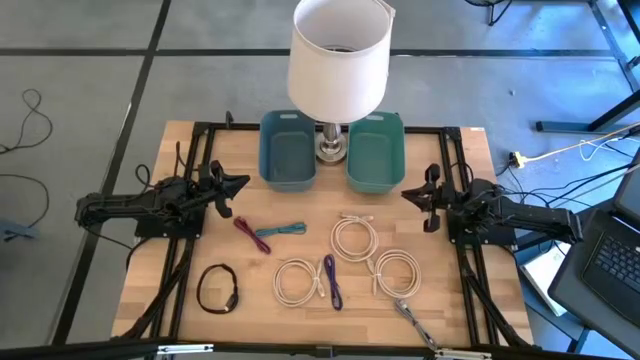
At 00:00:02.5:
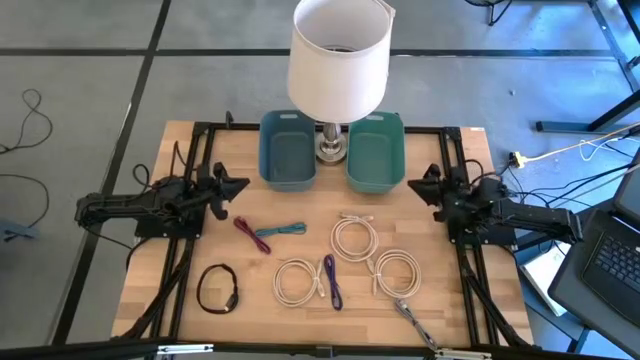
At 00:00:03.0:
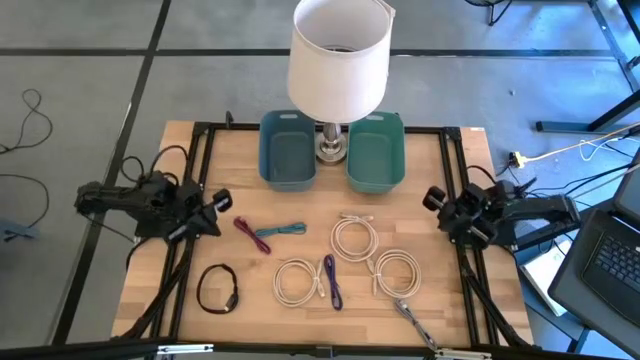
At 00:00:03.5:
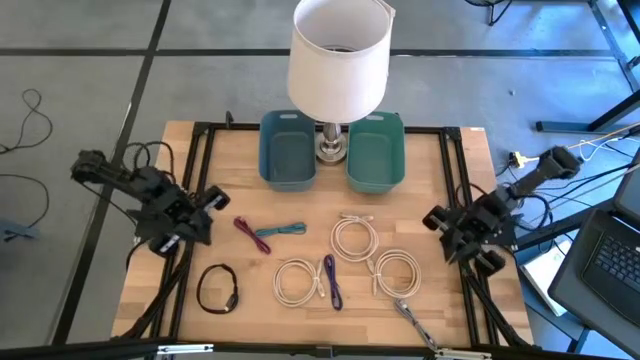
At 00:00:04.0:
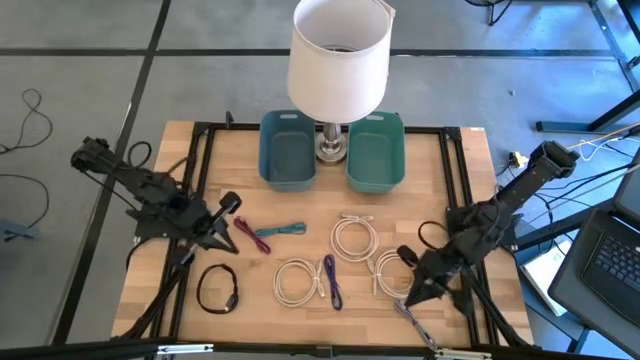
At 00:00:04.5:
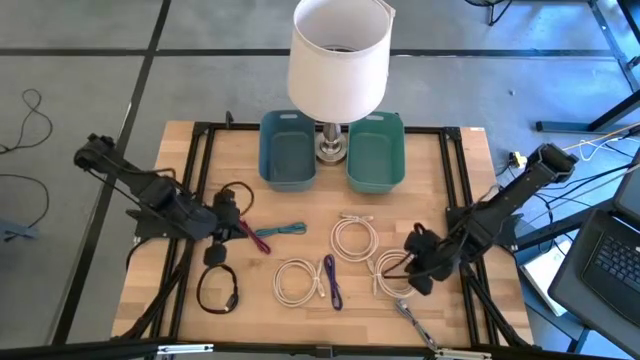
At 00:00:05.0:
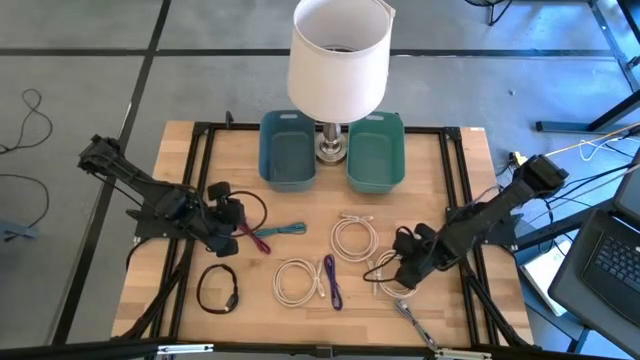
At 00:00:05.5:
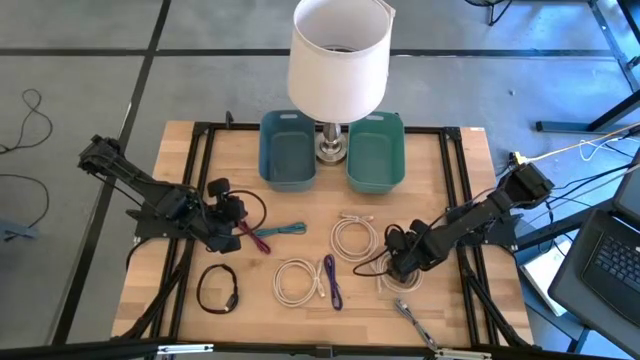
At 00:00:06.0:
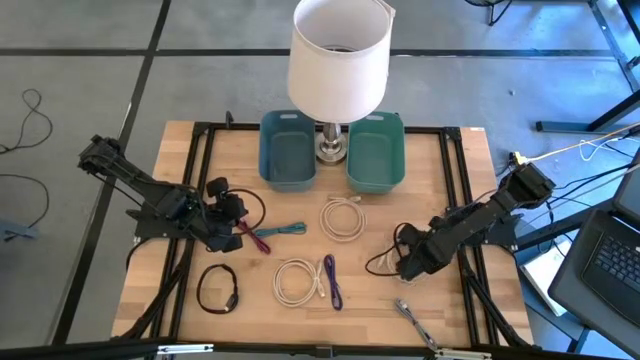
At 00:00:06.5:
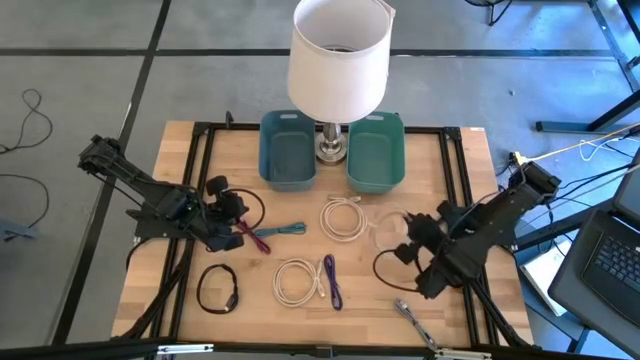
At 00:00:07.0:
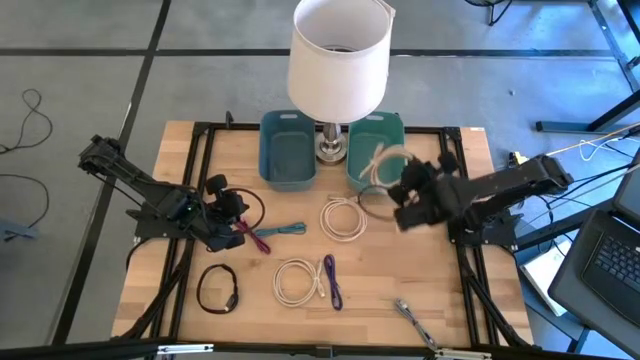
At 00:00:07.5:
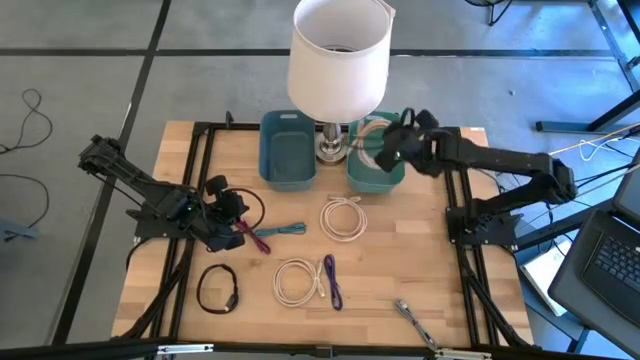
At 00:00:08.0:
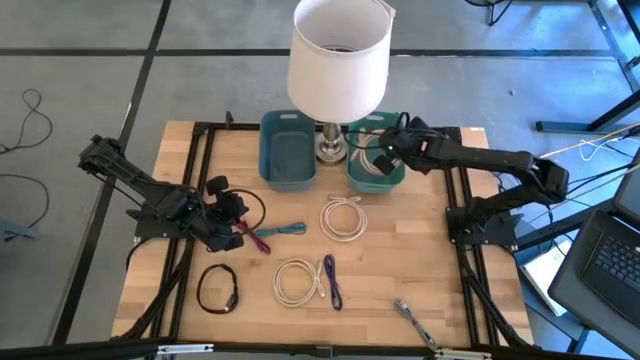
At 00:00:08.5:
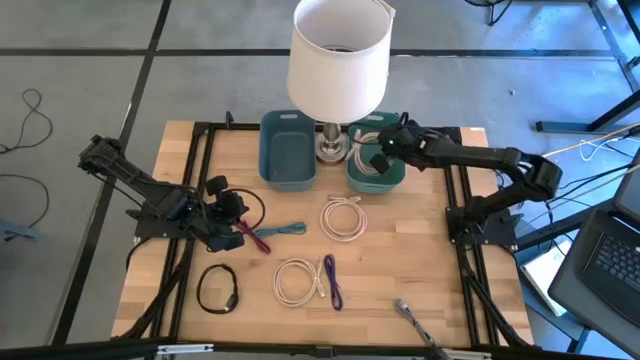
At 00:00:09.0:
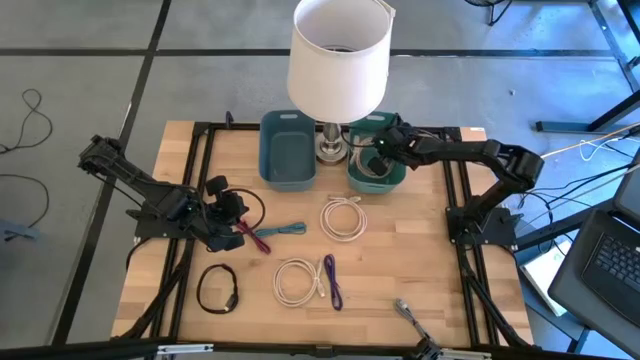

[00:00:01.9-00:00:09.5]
Put the bottom right white hdmi cable into the green bin

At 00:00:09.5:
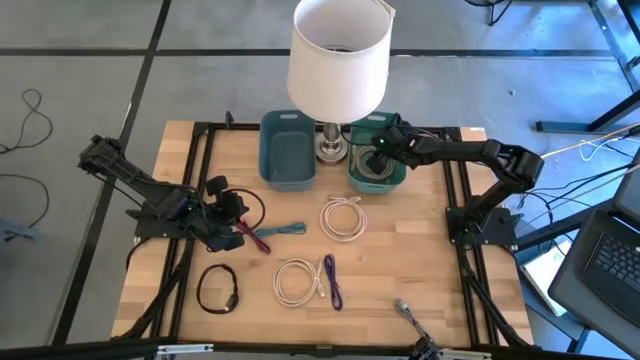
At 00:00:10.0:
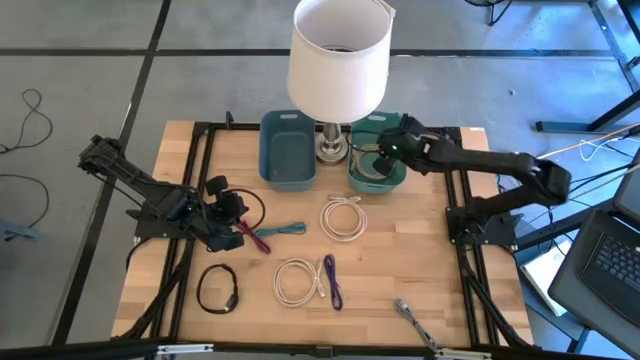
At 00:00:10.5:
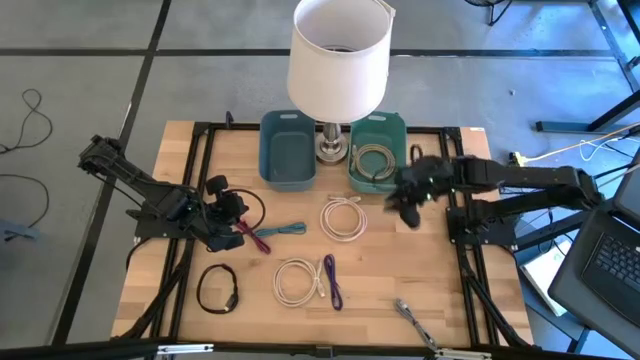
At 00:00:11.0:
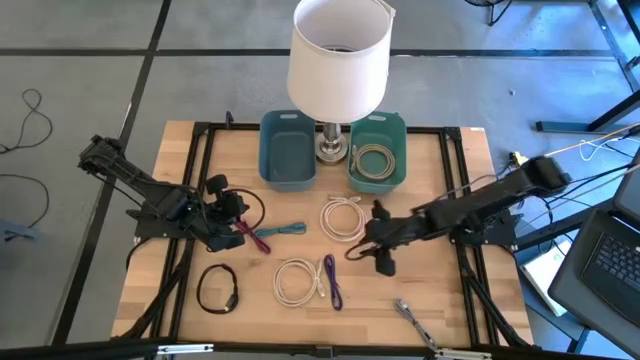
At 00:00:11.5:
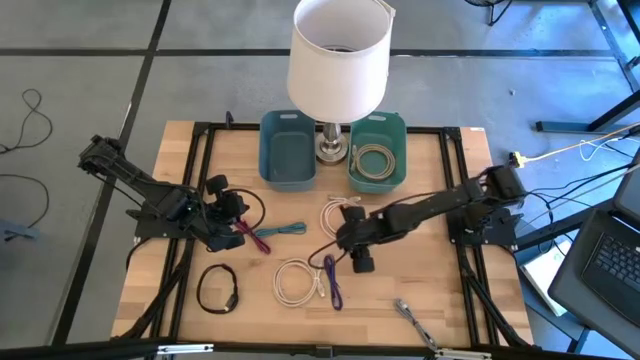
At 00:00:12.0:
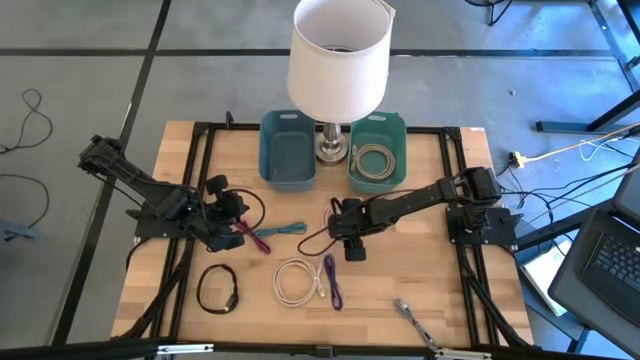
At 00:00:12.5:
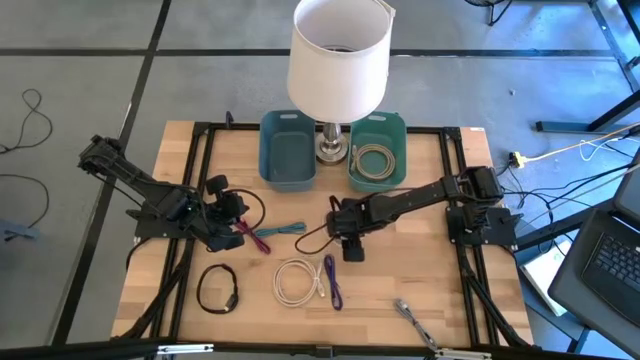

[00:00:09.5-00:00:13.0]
Put the top white hdmi cable into the green bin

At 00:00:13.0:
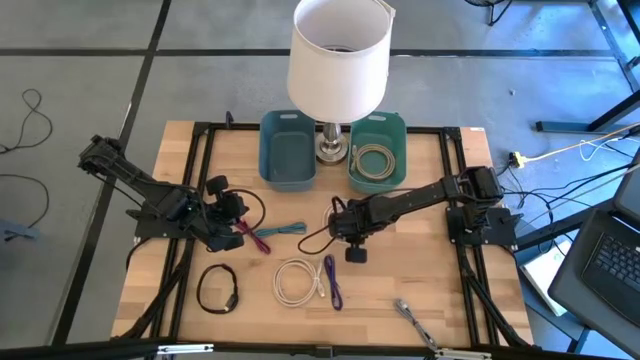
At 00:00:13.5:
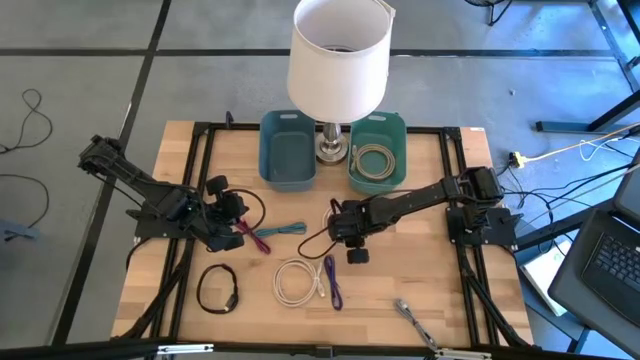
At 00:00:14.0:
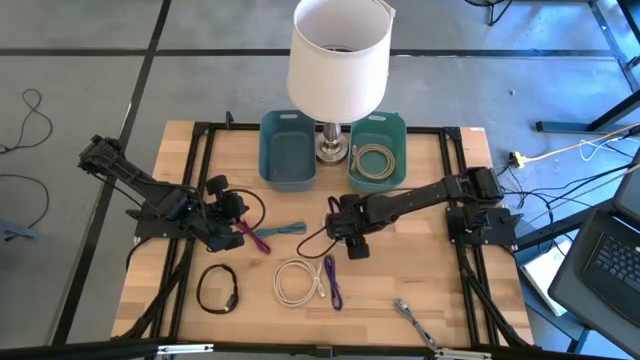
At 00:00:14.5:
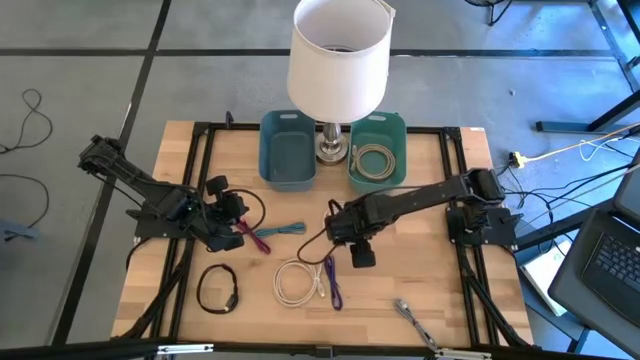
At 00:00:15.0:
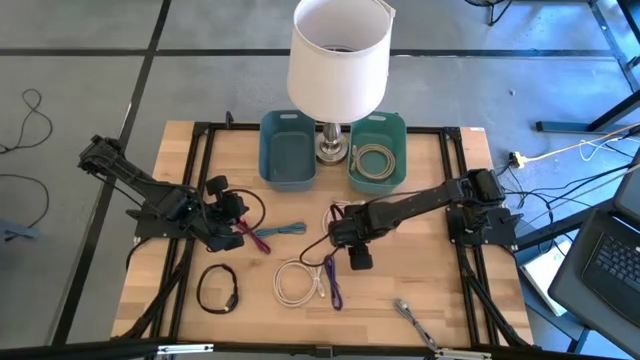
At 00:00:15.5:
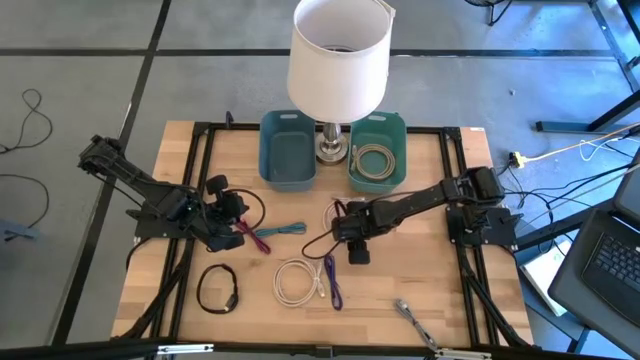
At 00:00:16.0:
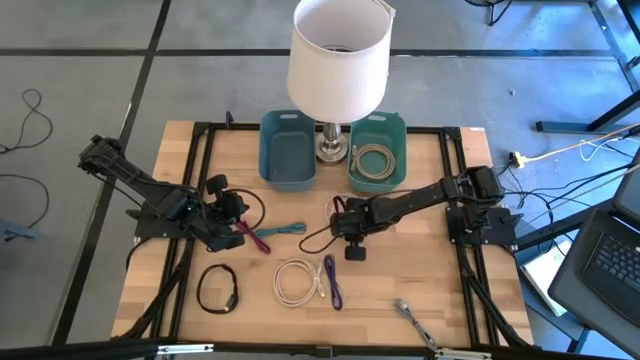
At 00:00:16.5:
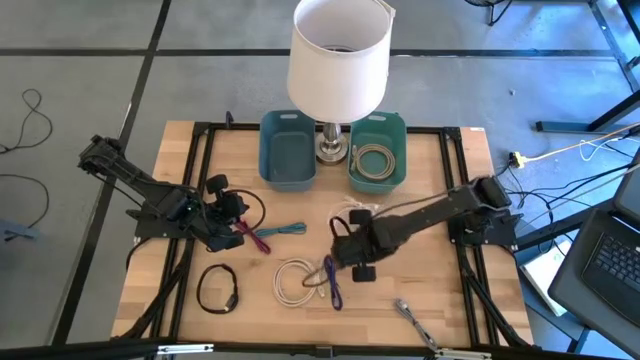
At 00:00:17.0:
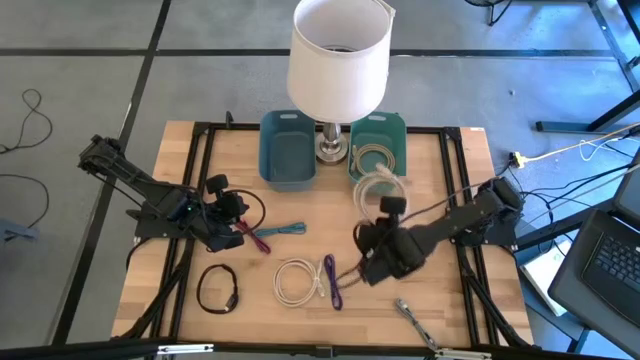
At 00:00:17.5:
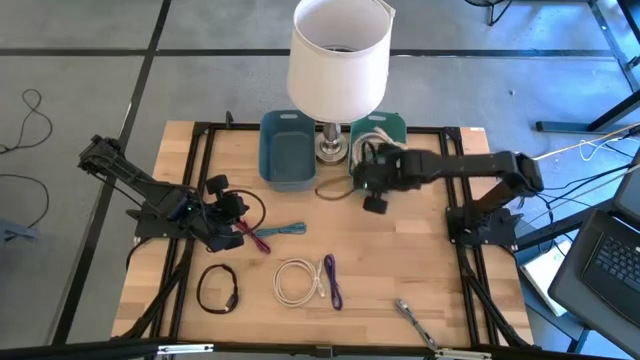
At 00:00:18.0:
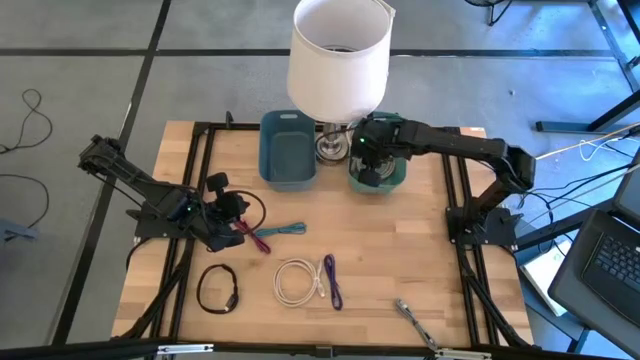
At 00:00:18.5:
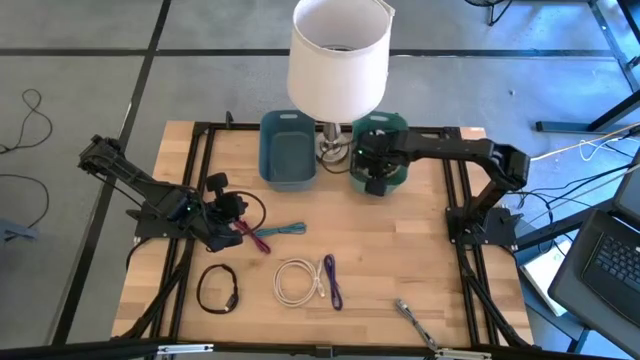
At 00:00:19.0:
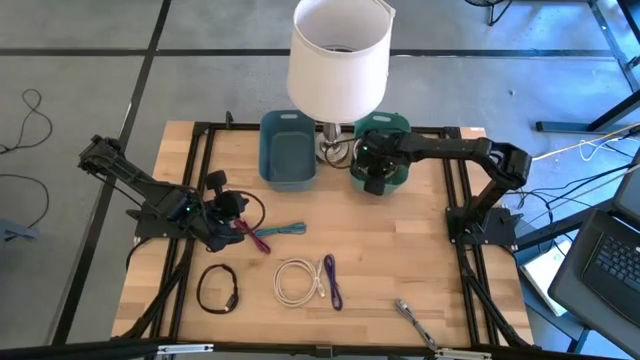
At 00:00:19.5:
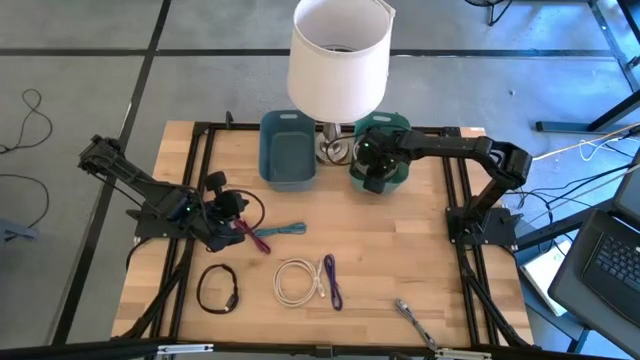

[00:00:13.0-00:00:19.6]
Put the top white hdmi cable into the green bin
